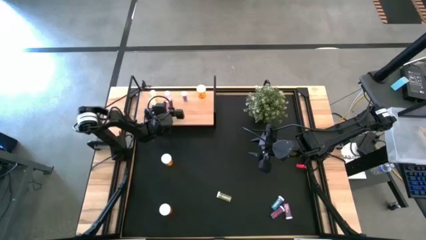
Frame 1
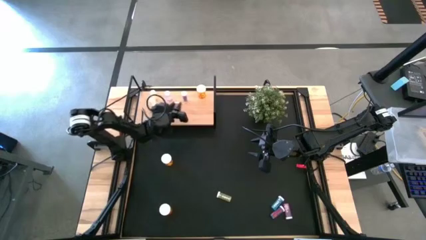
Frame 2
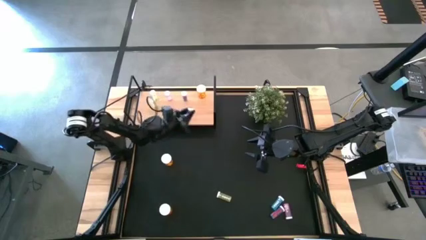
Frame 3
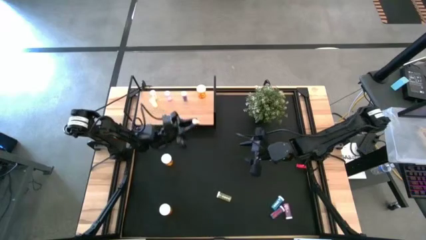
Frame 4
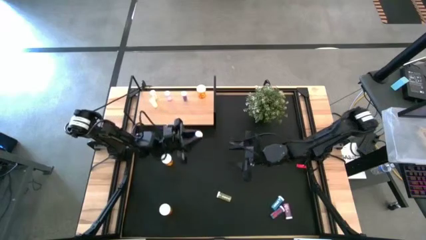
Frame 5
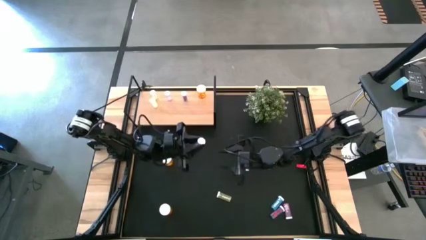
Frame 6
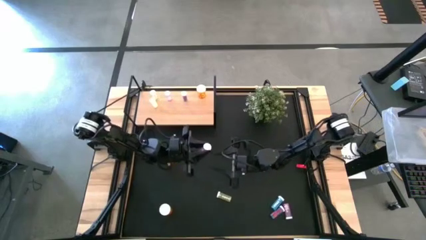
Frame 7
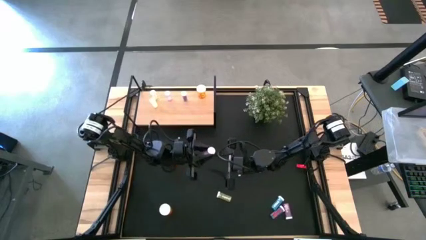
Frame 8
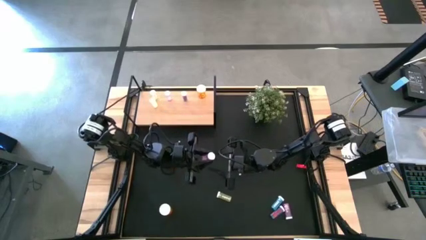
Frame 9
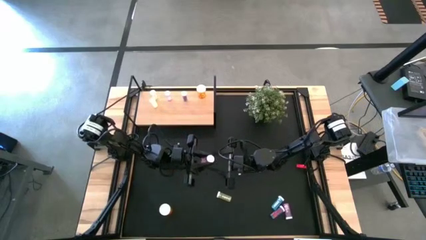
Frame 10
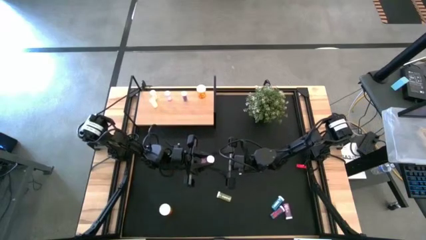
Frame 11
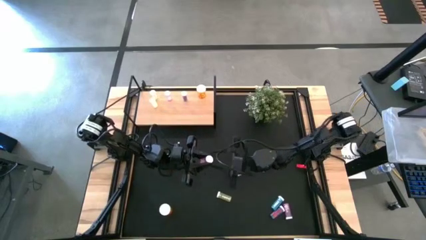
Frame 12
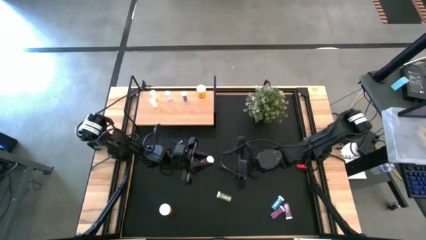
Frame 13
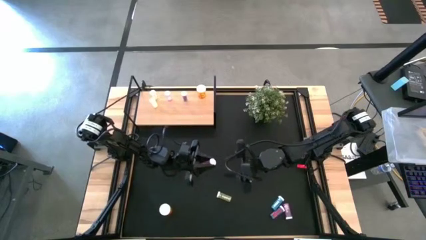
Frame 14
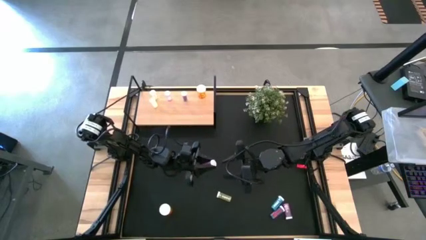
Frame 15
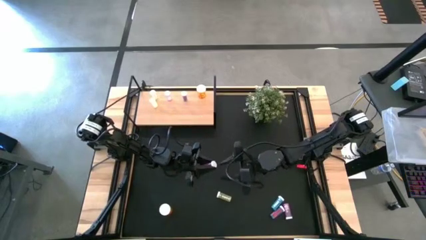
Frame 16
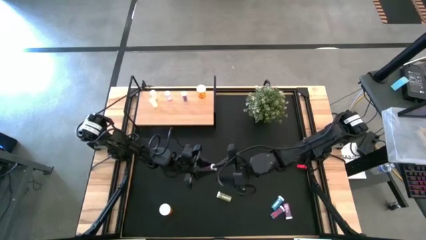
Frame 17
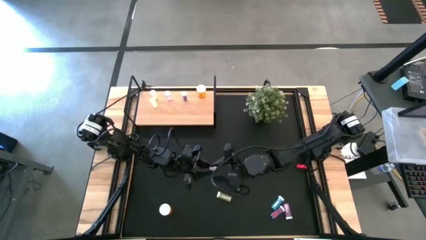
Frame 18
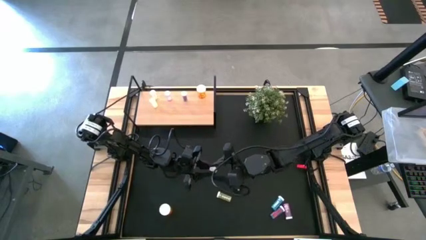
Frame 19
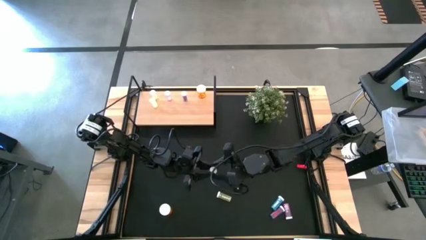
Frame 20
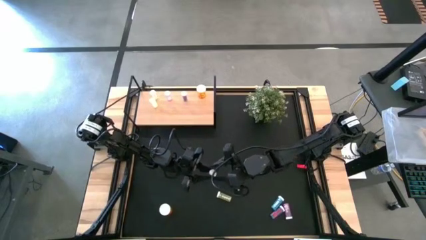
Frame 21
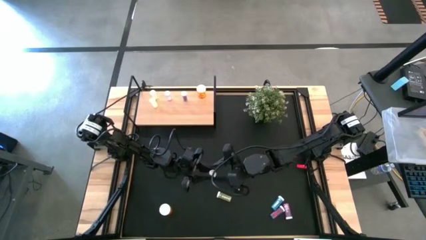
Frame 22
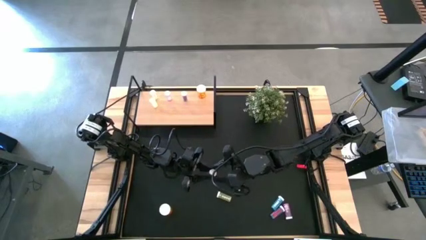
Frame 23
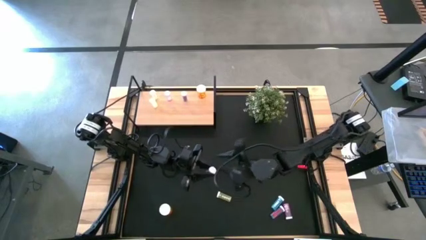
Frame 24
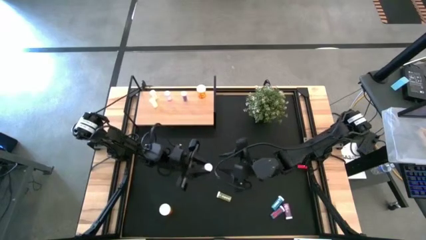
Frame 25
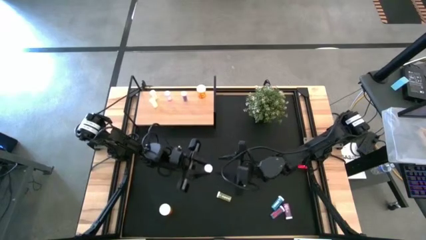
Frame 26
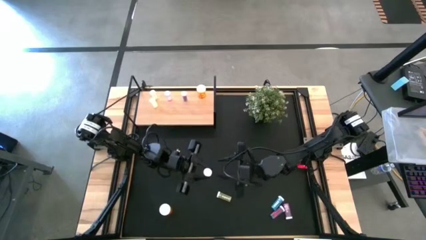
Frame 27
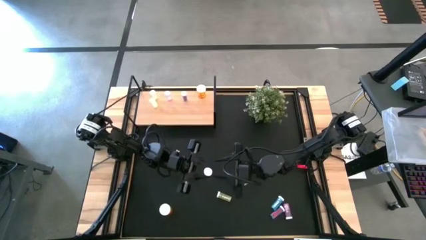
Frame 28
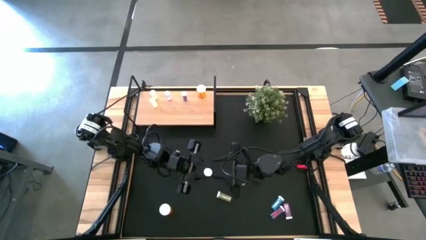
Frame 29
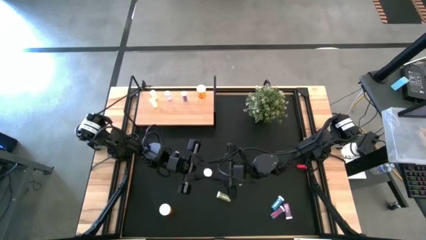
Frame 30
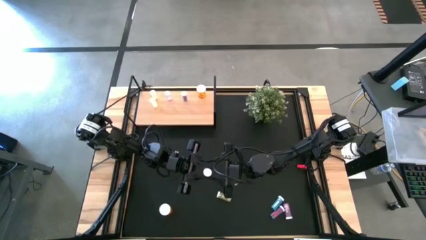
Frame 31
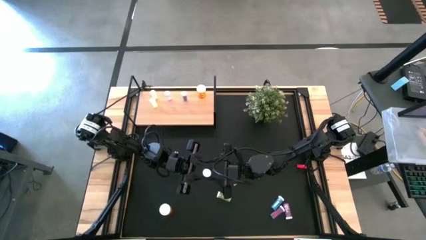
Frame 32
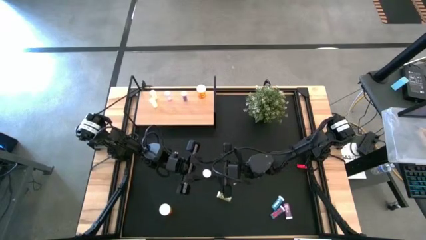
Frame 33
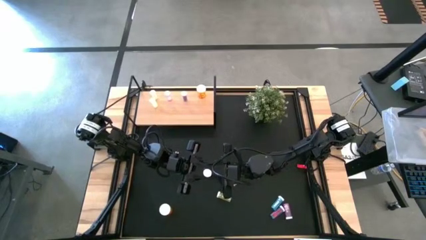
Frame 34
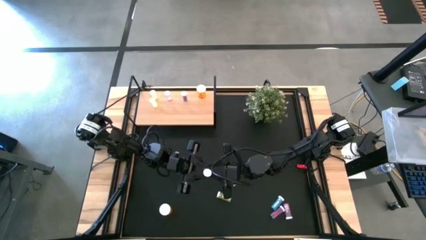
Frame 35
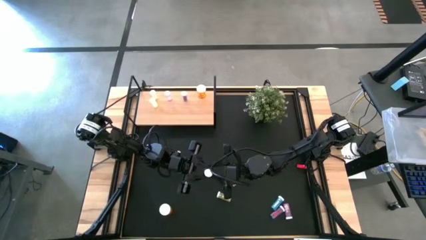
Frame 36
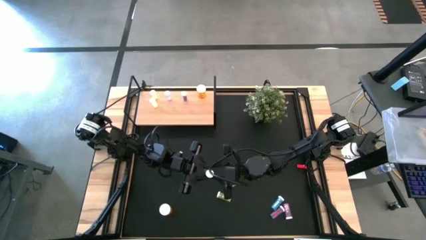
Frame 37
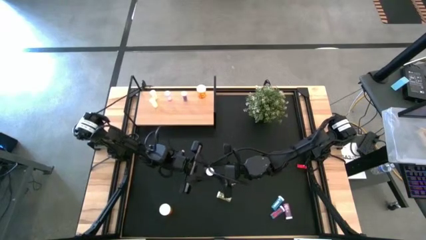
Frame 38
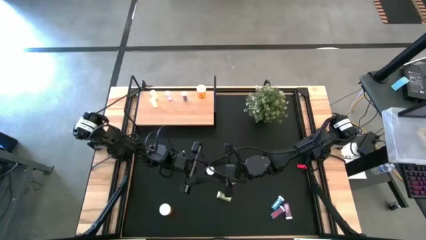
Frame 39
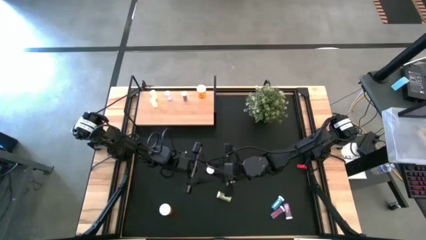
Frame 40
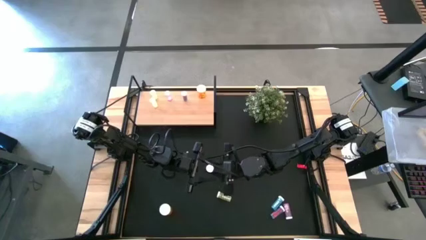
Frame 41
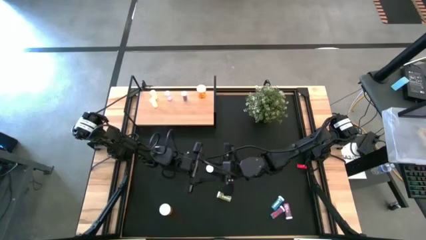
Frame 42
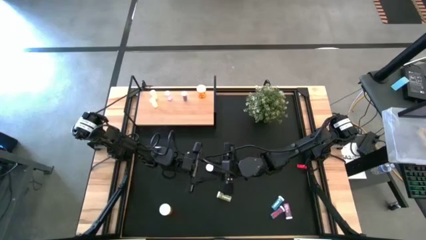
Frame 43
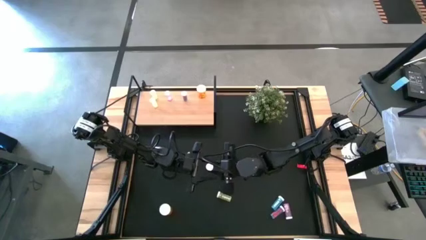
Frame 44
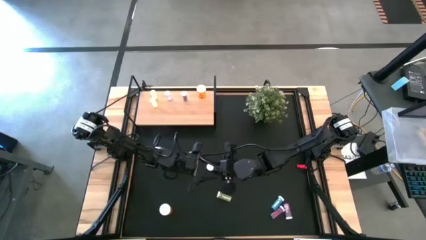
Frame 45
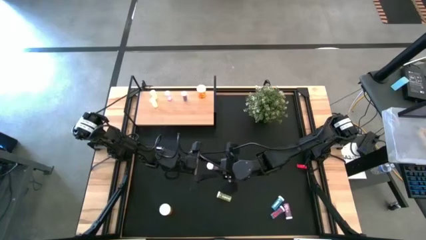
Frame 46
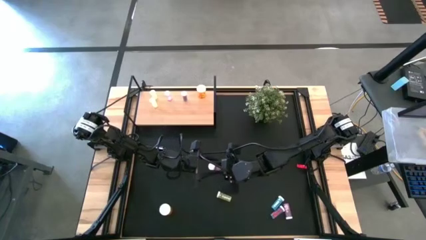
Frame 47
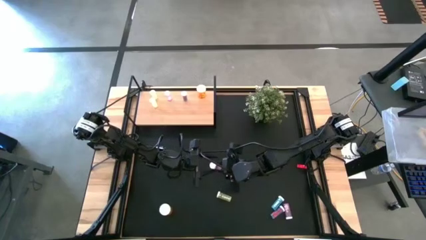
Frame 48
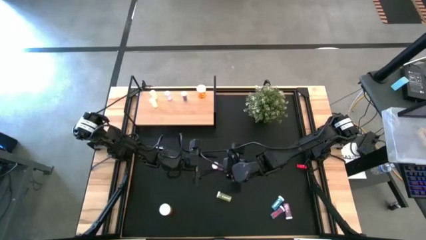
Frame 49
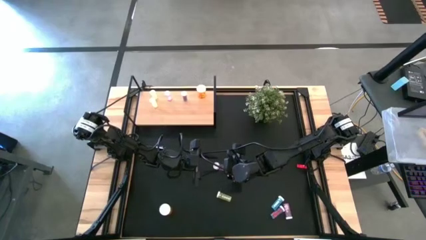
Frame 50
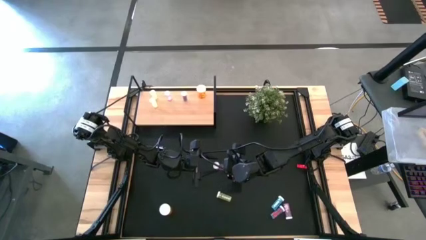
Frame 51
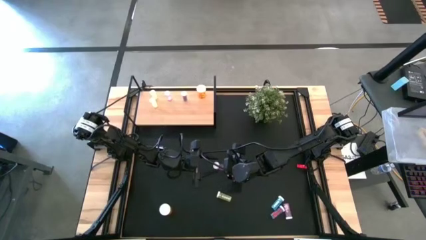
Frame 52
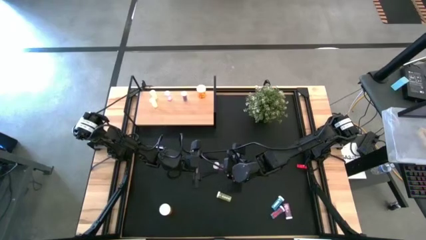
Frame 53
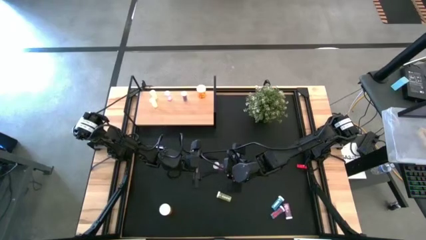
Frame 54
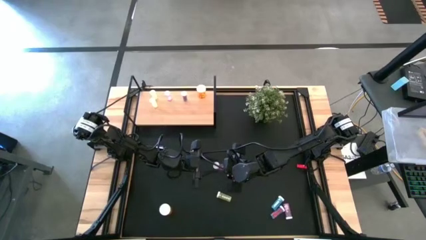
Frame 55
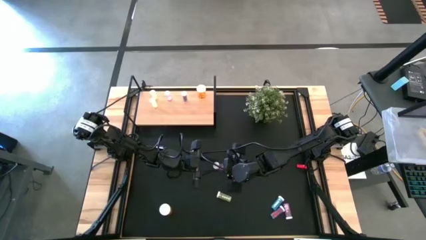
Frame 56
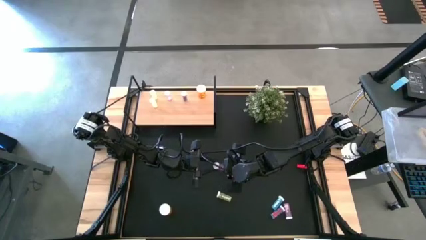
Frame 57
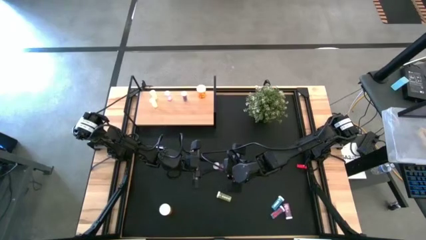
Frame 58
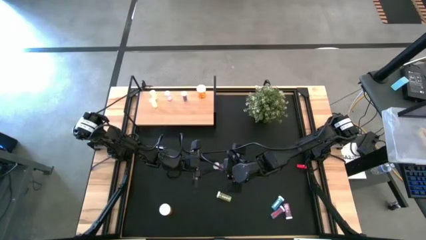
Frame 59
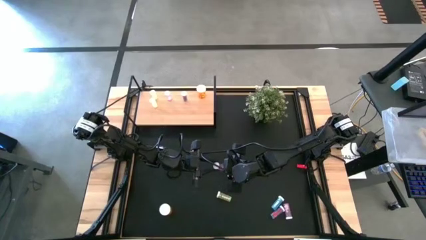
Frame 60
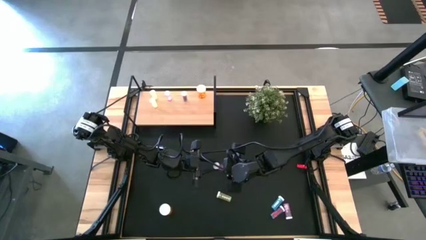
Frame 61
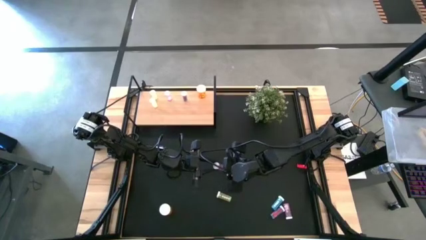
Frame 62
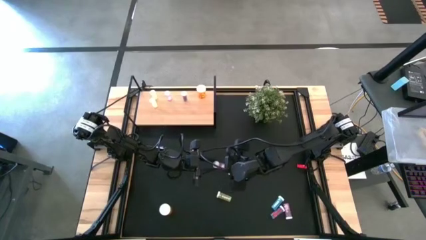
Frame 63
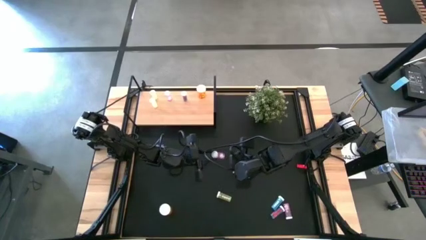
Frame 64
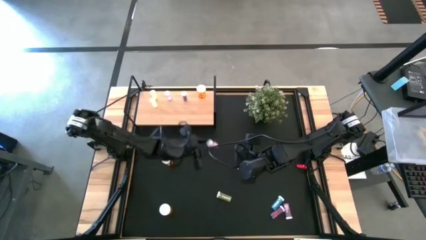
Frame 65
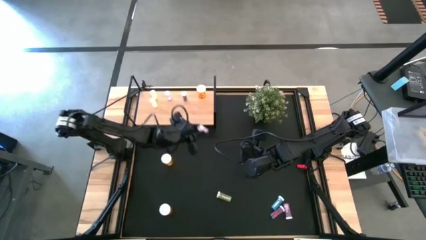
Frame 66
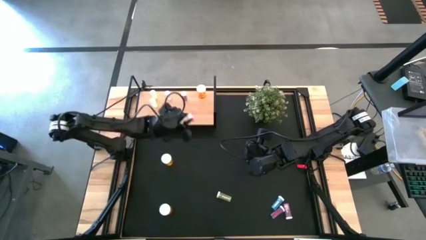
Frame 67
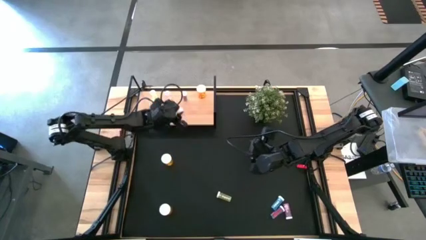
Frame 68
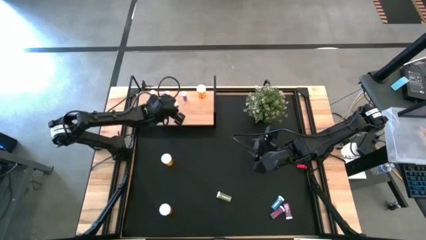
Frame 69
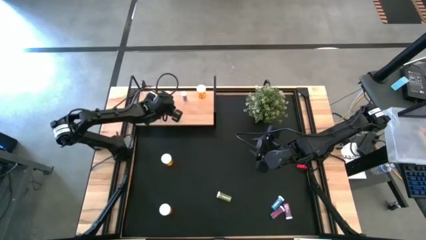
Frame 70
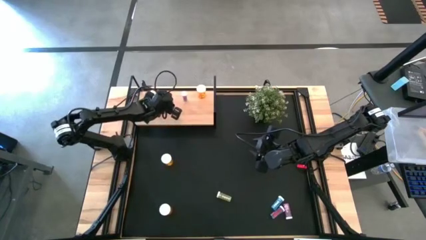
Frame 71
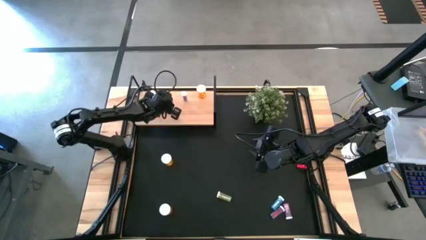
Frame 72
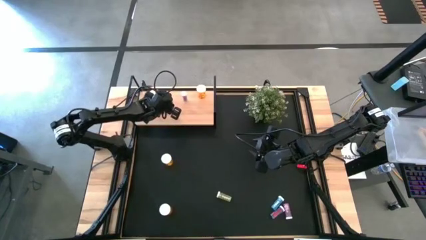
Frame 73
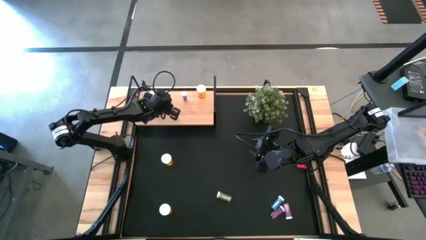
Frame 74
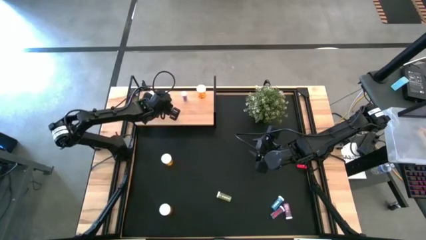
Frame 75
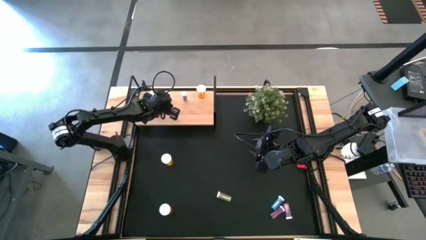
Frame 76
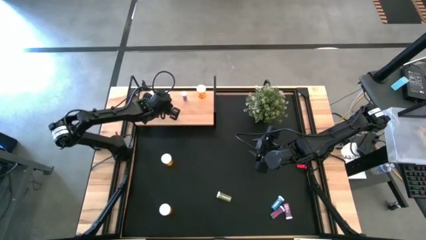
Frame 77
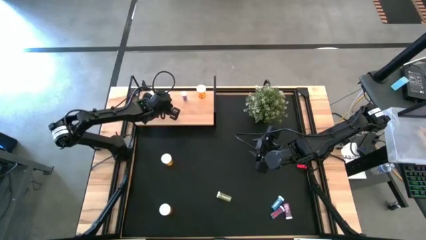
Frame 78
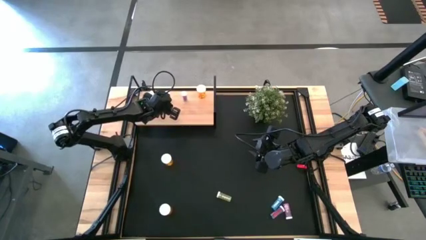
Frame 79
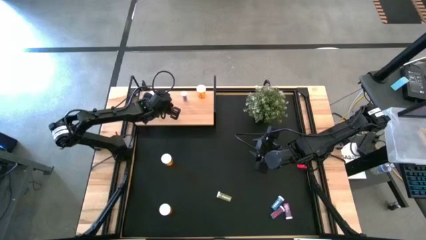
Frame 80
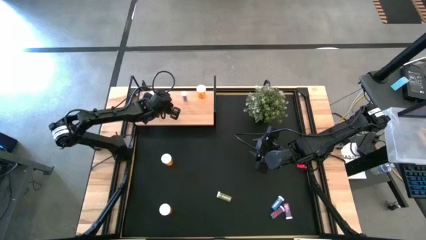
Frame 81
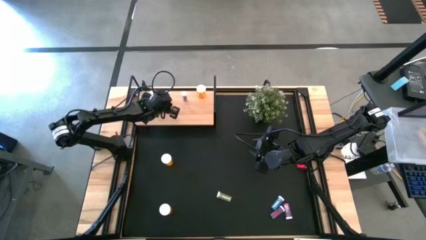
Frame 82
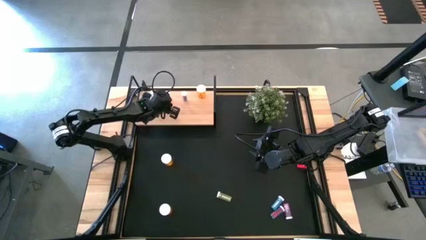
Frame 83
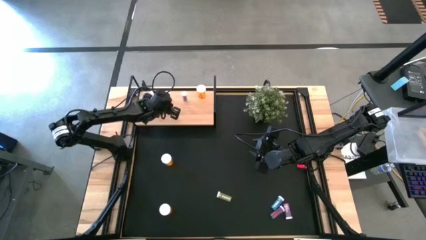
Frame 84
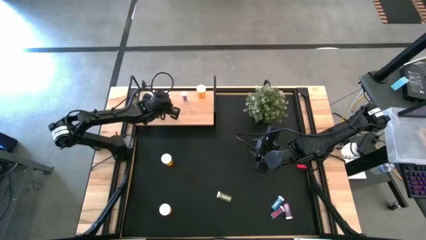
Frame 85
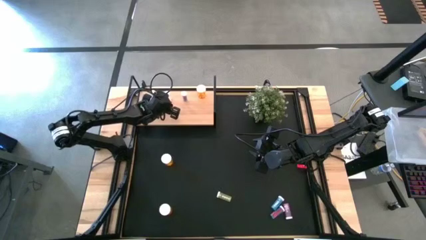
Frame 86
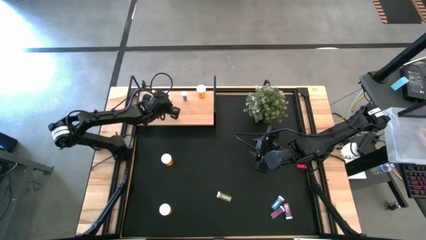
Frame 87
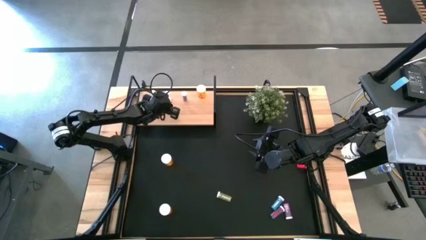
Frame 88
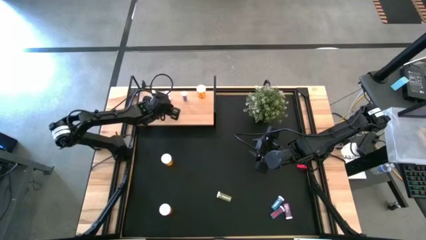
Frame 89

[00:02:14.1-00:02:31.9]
Task: Pick and place medicine bottles onto shelf by color
Put the top pink medicine bottle on the shelf aligned with the other pink medicine bottle
